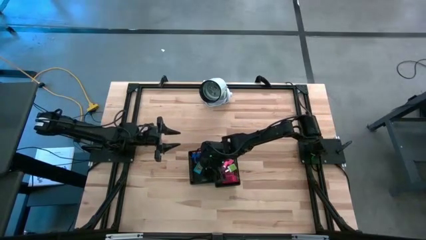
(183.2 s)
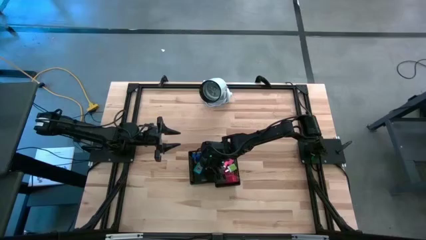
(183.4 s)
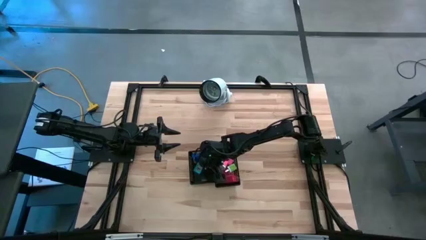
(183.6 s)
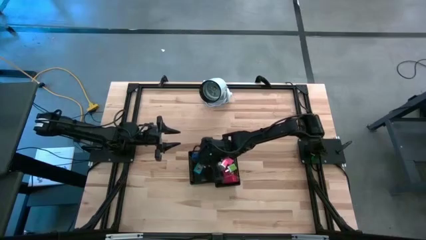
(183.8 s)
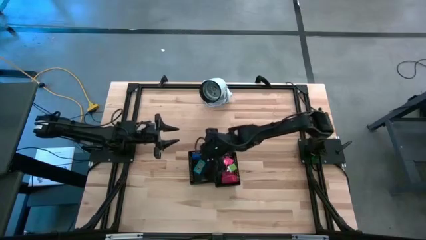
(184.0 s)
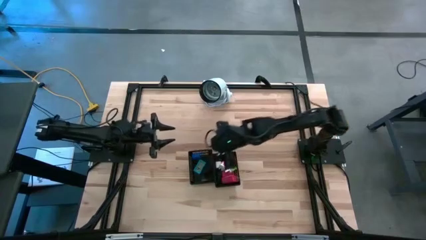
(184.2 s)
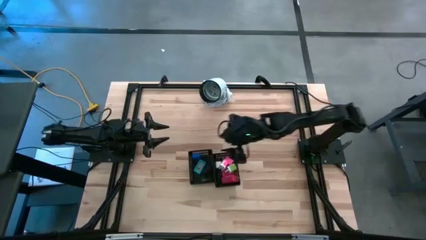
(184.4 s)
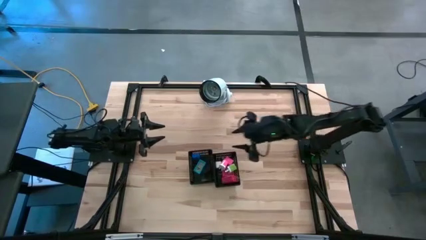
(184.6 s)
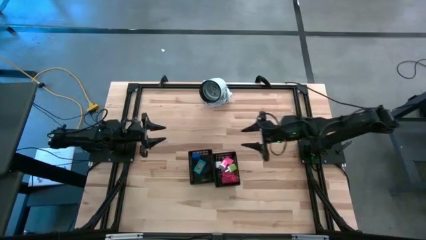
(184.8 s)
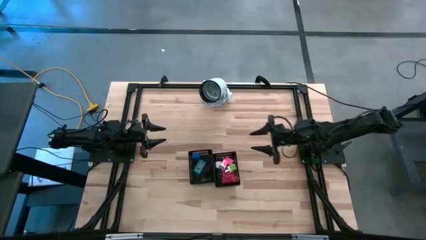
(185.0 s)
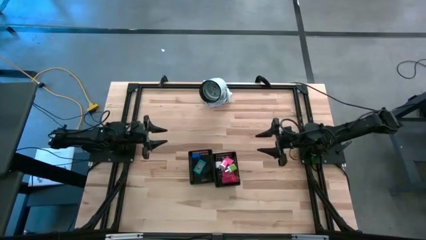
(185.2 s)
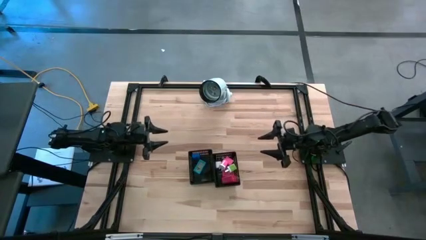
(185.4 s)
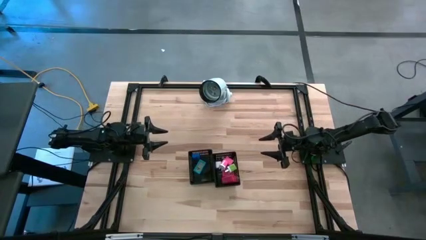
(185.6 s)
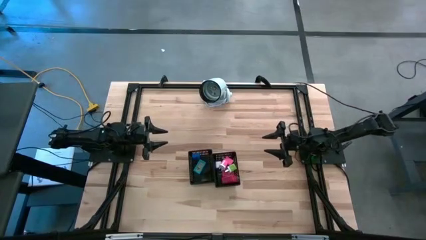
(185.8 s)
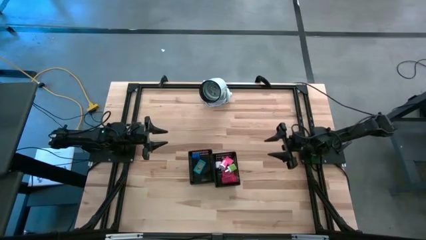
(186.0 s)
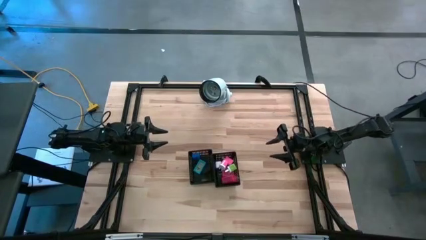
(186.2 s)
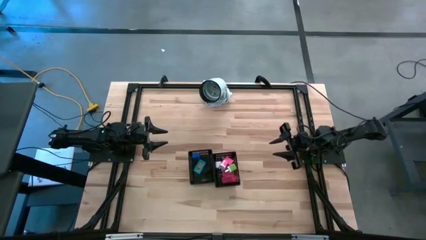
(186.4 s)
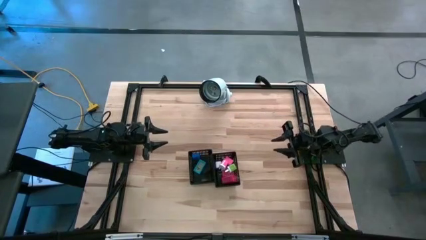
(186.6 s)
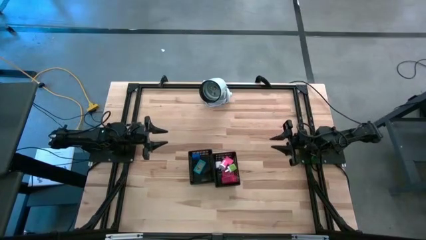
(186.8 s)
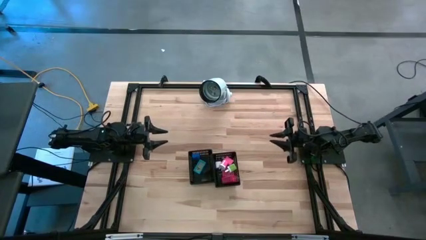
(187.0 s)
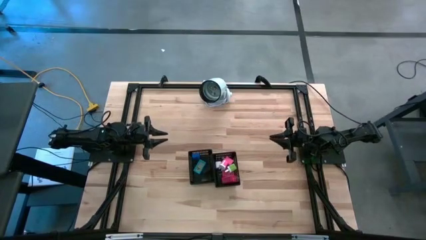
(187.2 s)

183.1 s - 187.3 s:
Task: Pick & Place Office items
Return to Home Position

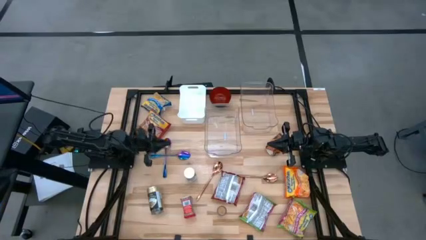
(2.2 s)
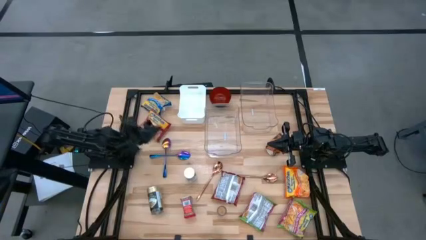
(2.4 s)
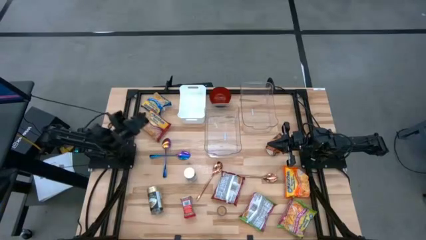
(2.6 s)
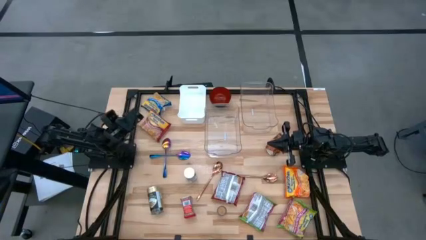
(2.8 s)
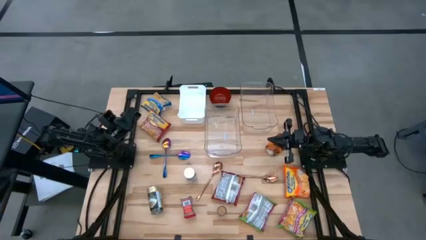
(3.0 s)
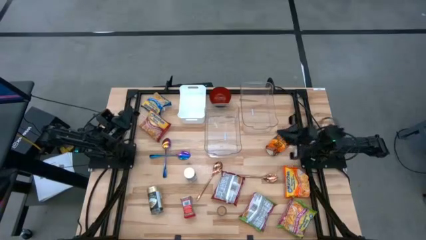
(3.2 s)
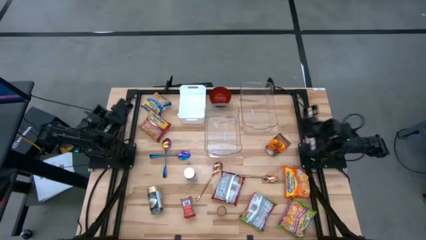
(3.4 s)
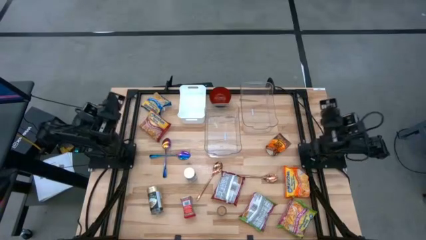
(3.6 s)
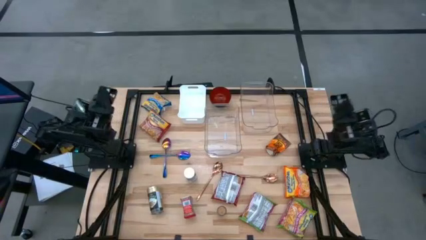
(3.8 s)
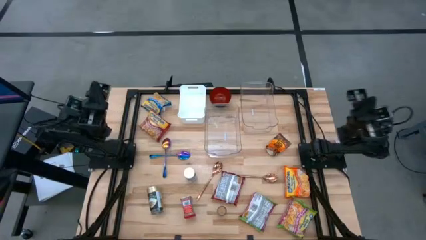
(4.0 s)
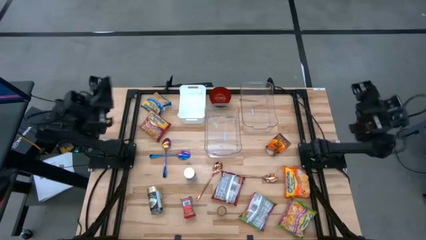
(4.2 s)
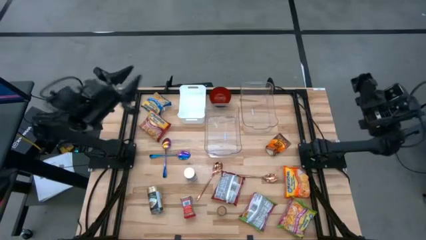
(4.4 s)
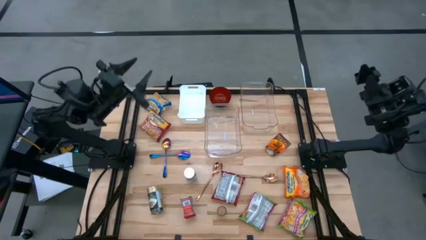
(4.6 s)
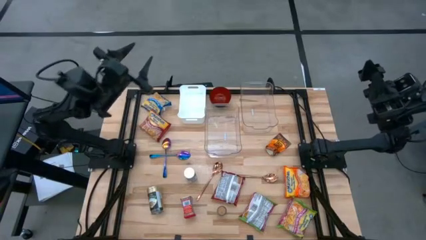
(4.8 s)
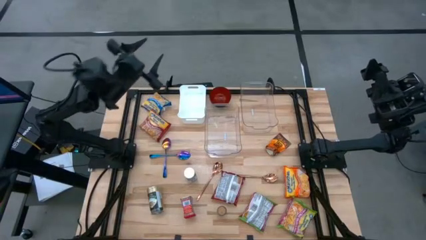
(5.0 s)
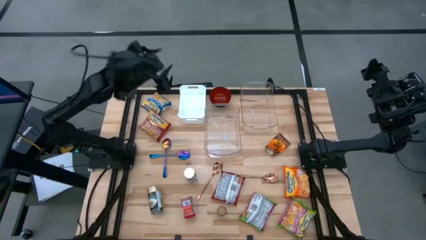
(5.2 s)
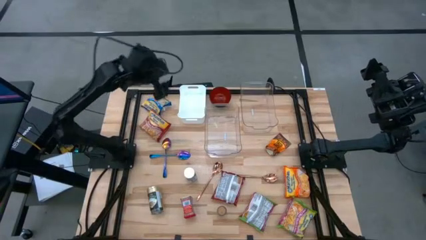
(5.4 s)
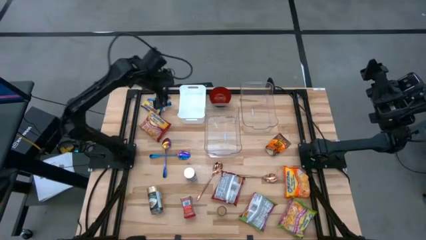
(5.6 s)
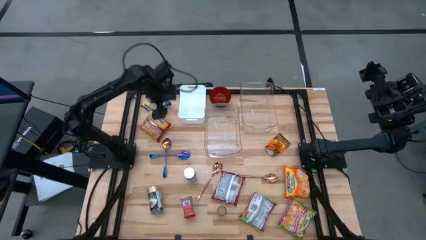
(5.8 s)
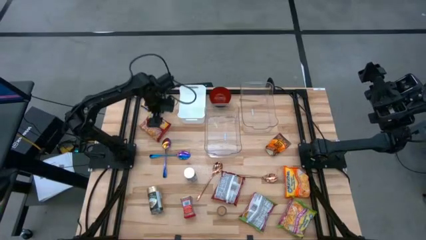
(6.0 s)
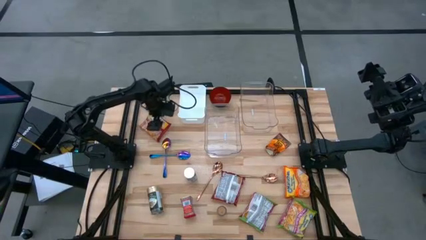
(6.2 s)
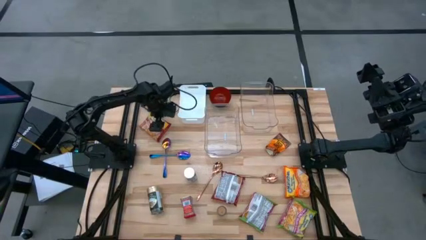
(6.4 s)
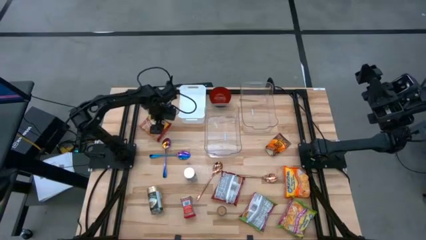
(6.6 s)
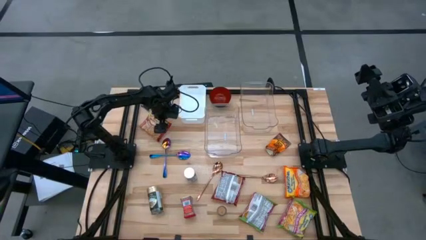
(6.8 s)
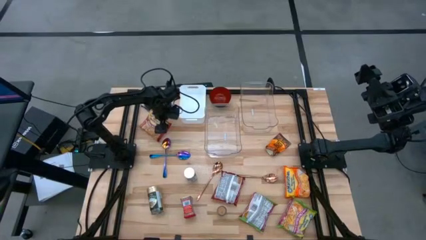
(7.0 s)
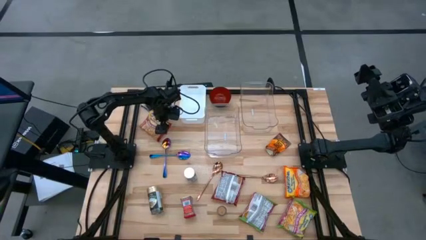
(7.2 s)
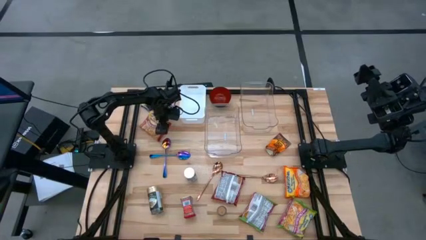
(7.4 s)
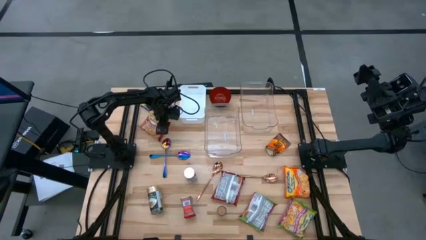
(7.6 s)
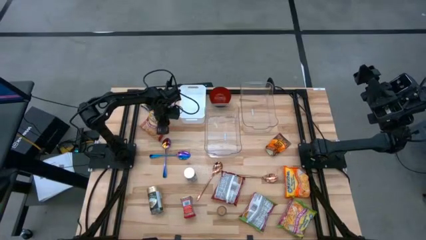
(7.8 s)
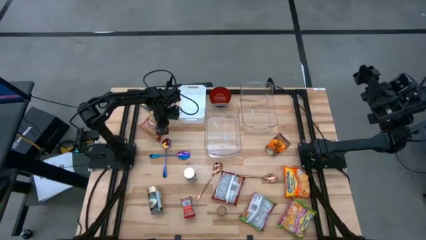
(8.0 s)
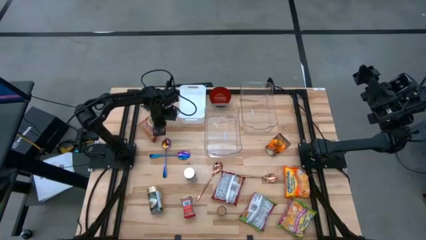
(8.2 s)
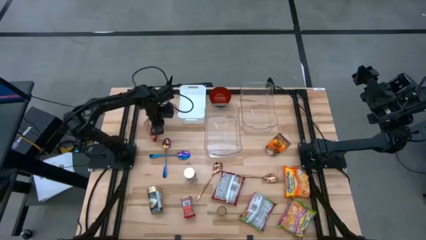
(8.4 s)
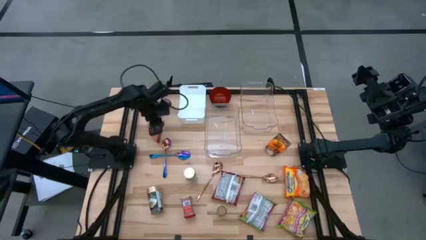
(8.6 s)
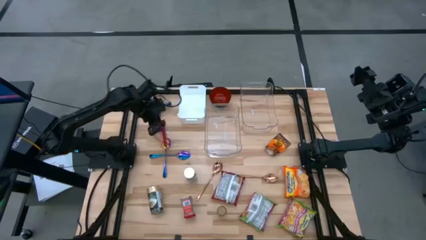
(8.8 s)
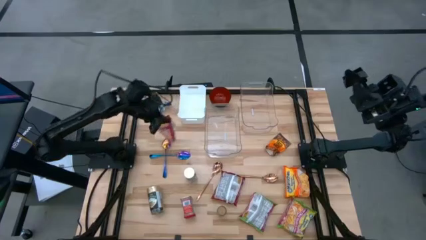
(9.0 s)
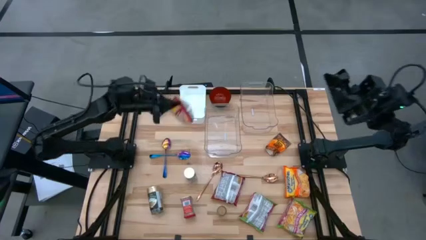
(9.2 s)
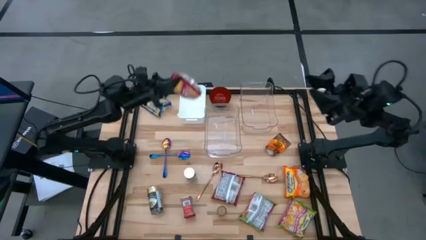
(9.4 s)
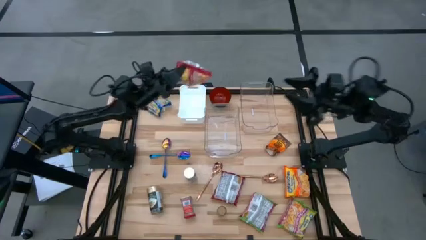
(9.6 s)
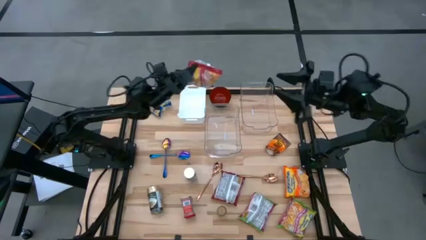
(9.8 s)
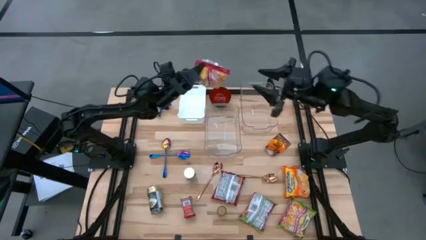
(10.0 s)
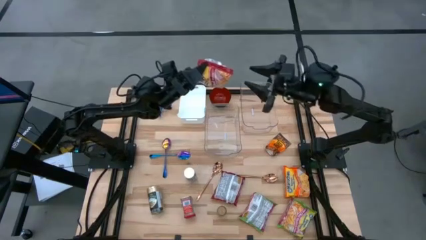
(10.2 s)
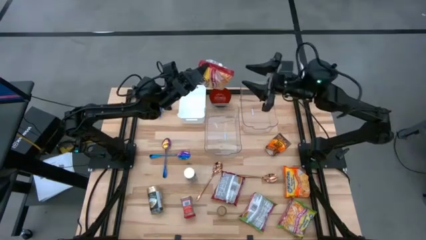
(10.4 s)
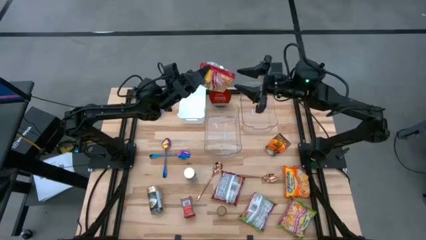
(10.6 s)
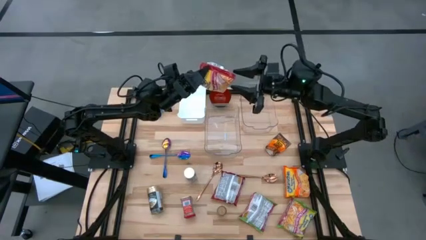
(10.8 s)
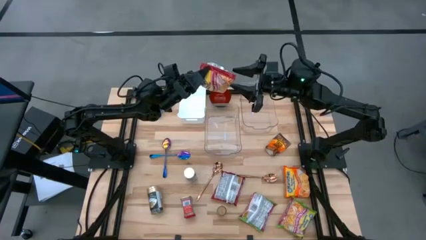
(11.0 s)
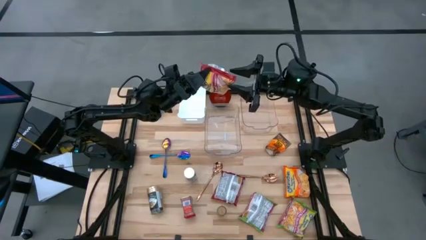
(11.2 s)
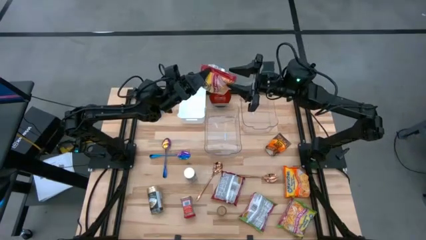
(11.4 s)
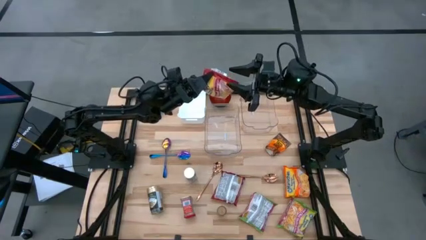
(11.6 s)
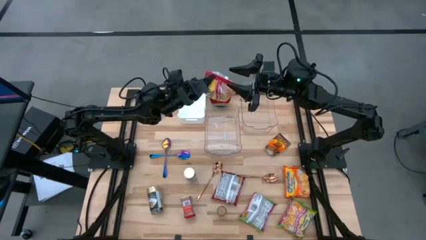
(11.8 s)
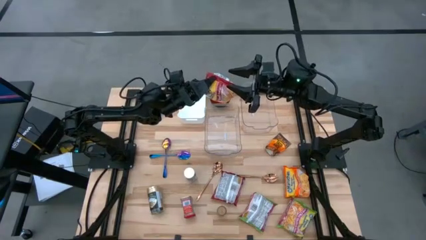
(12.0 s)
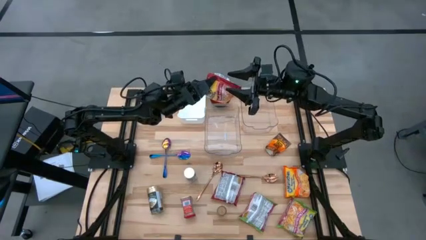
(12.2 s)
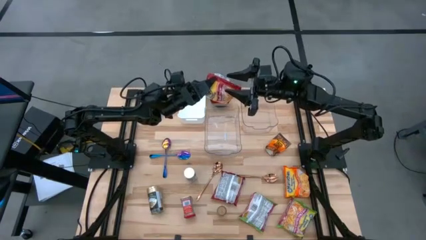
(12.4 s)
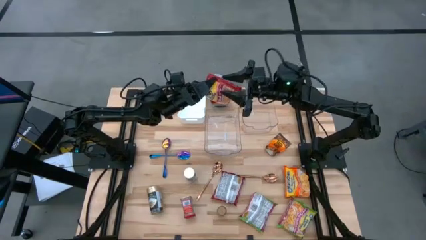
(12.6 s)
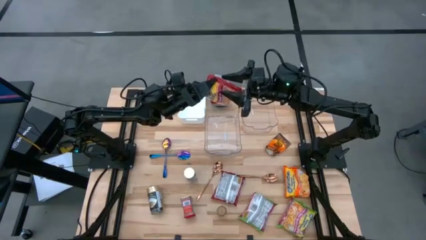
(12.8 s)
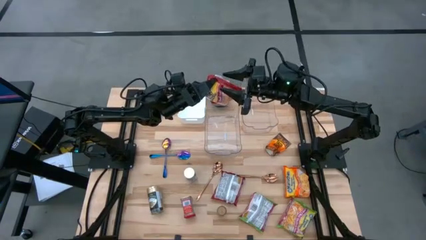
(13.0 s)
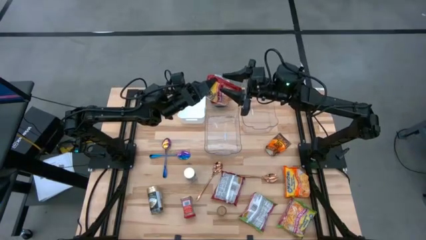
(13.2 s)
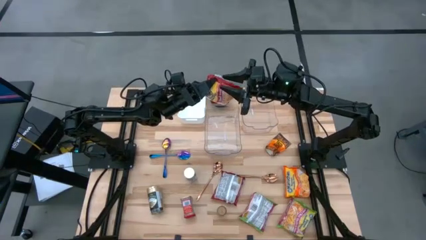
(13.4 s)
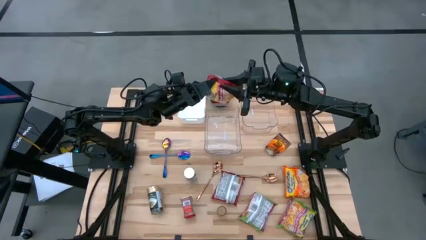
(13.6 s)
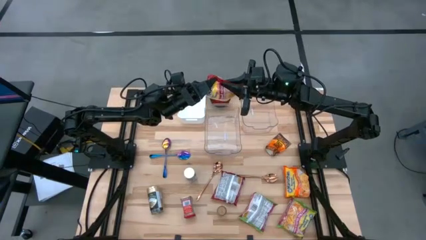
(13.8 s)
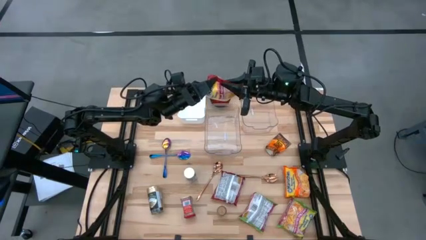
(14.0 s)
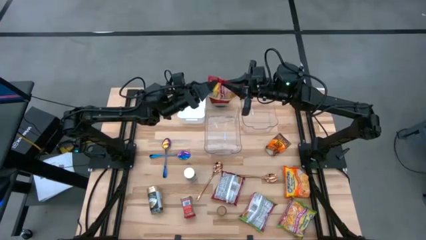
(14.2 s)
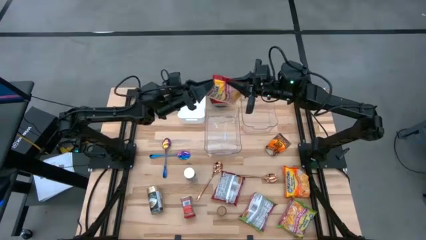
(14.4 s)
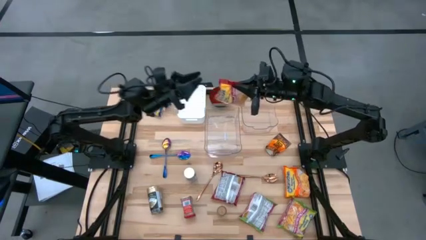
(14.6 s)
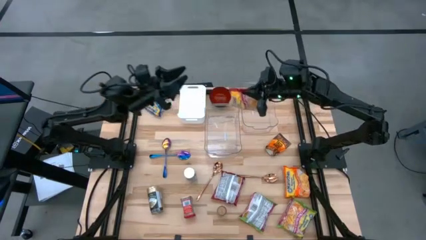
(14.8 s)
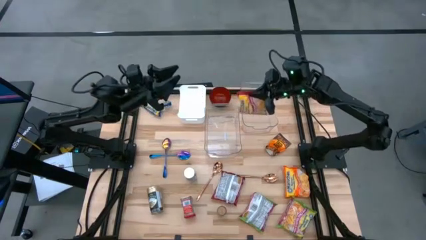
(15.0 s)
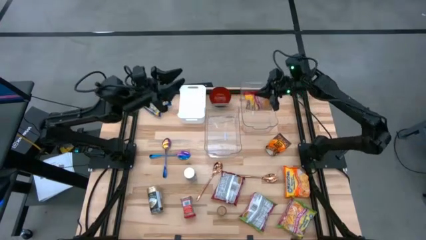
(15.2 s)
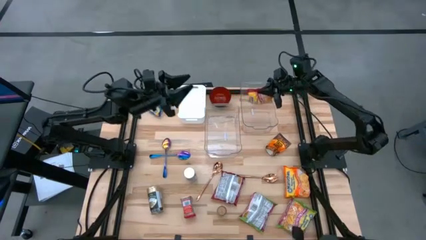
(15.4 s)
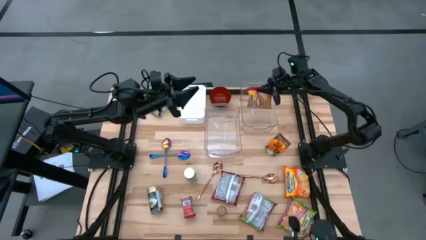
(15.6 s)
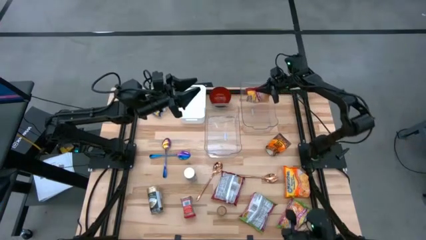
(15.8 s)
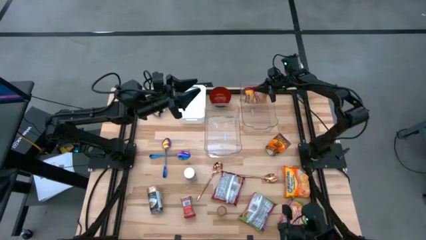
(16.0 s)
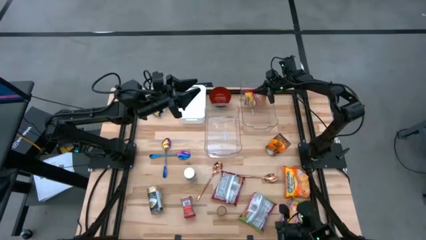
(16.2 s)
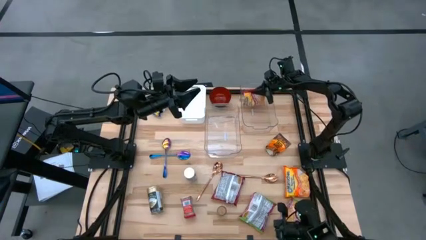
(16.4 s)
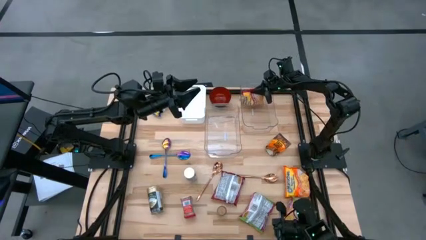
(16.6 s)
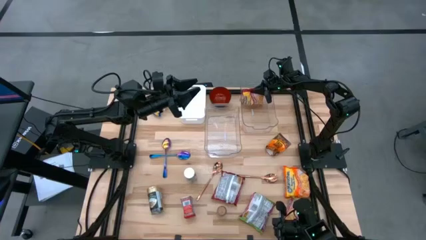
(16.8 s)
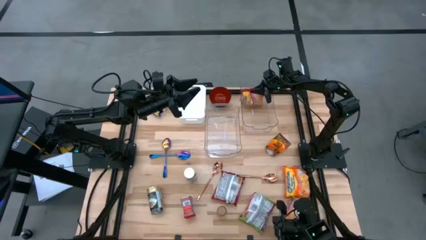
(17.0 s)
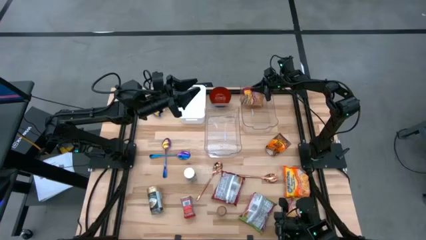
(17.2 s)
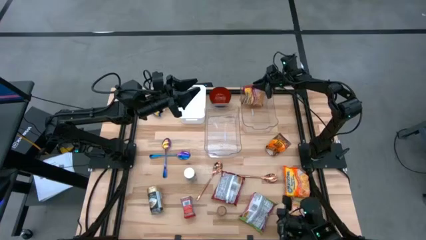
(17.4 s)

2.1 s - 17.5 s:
Task: Pick & Place Food Item
Put the top red noodle pack into the right transparent bin
